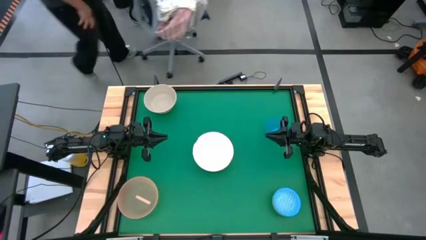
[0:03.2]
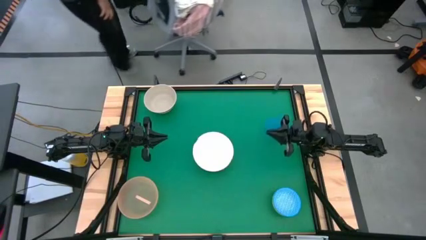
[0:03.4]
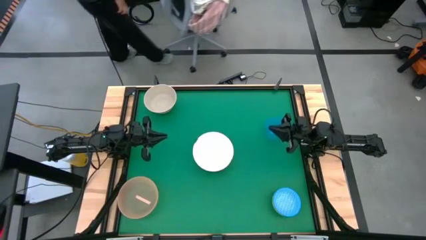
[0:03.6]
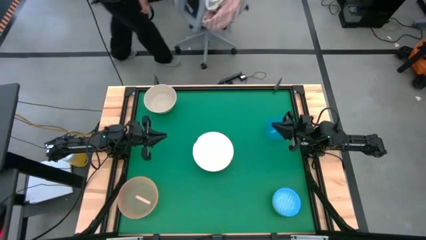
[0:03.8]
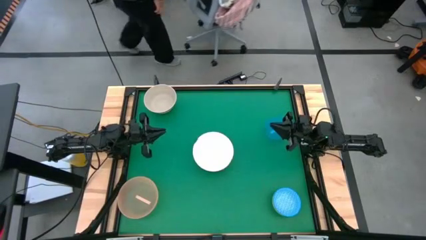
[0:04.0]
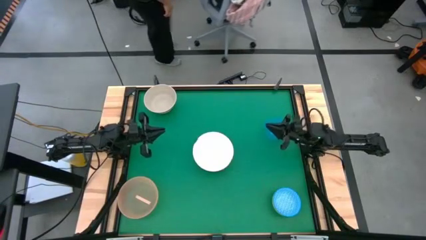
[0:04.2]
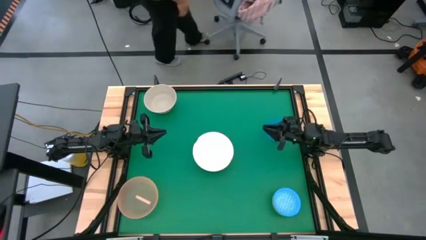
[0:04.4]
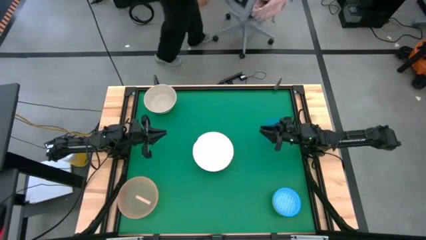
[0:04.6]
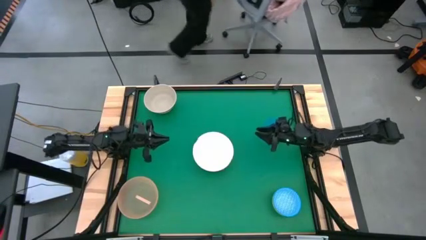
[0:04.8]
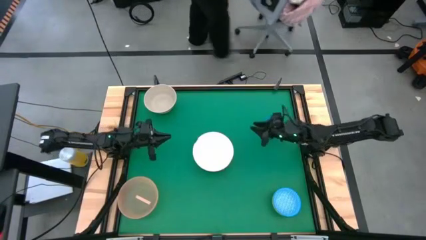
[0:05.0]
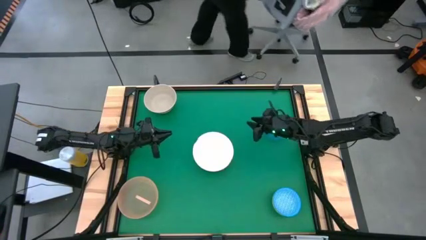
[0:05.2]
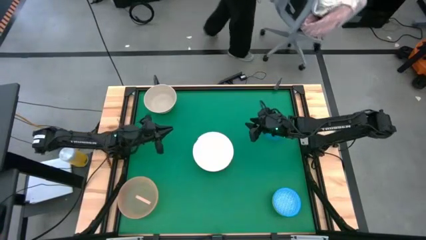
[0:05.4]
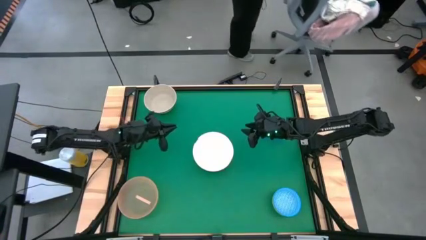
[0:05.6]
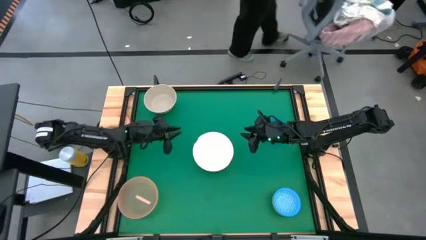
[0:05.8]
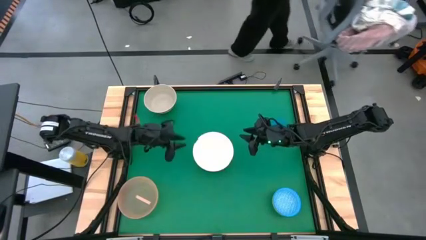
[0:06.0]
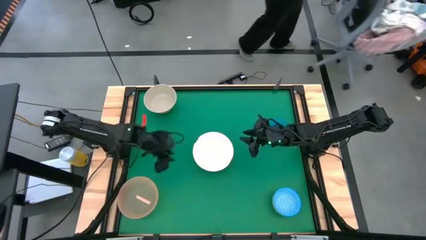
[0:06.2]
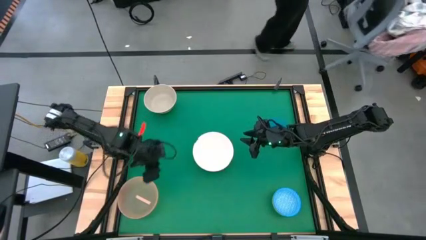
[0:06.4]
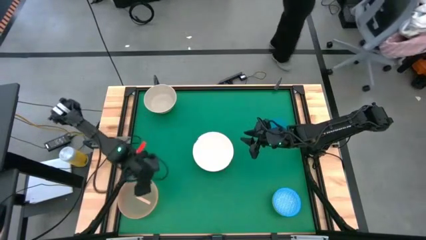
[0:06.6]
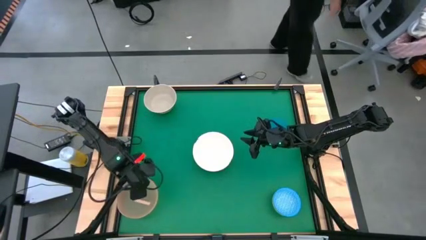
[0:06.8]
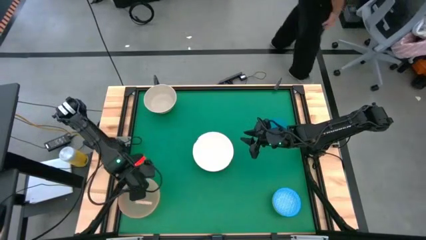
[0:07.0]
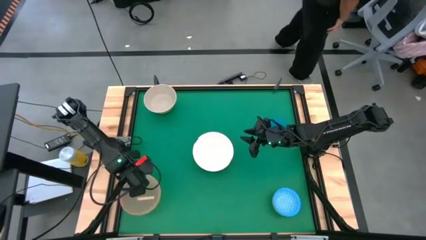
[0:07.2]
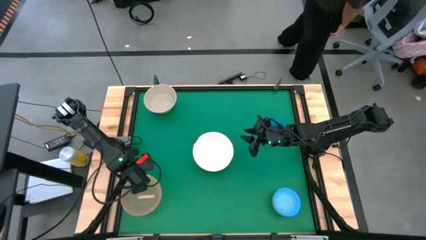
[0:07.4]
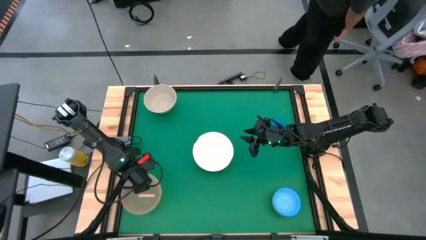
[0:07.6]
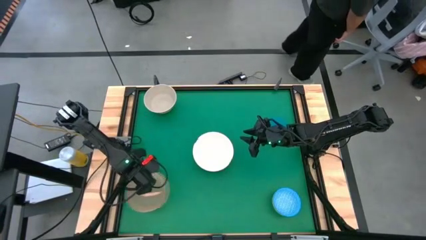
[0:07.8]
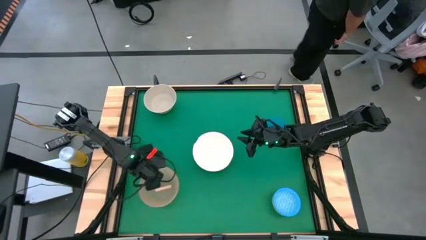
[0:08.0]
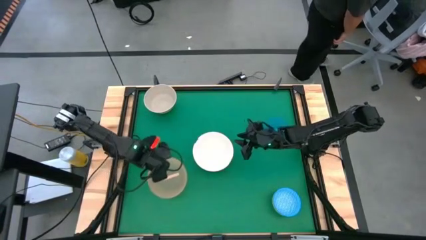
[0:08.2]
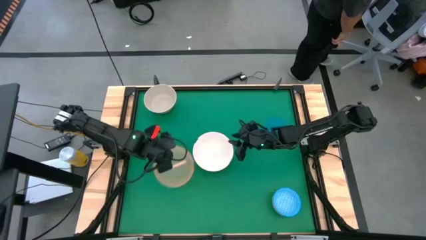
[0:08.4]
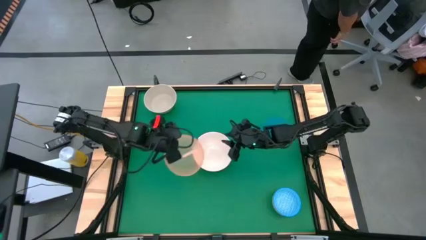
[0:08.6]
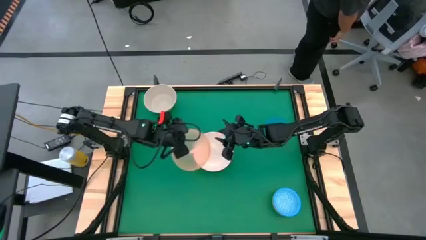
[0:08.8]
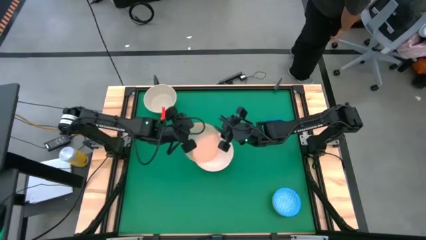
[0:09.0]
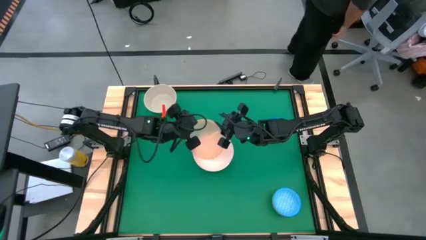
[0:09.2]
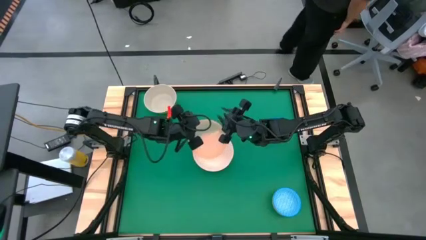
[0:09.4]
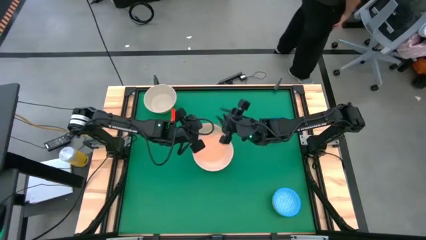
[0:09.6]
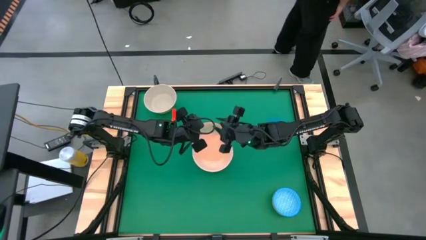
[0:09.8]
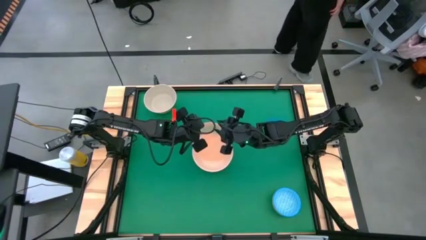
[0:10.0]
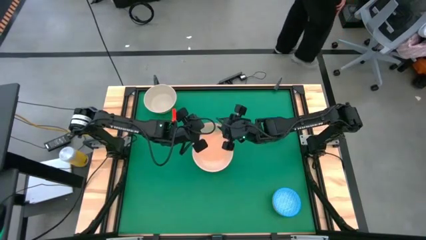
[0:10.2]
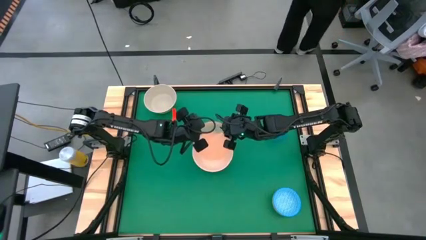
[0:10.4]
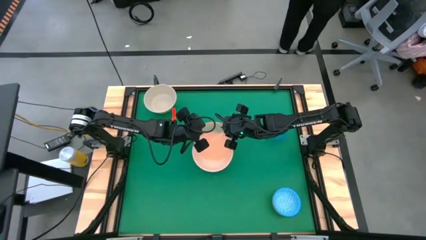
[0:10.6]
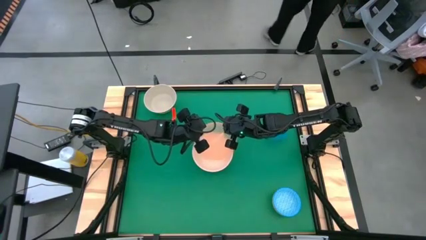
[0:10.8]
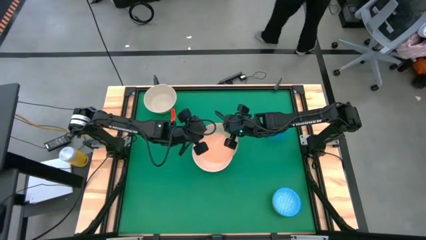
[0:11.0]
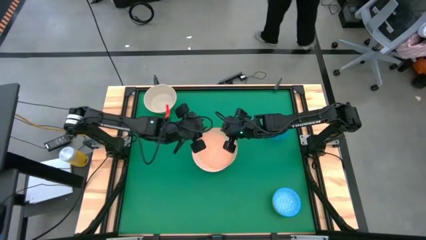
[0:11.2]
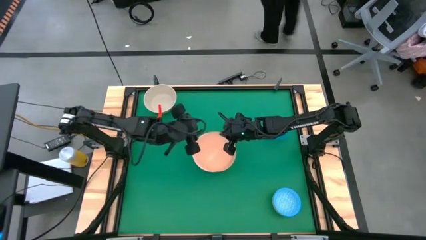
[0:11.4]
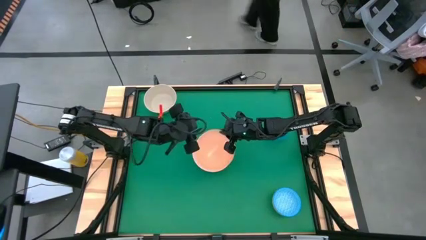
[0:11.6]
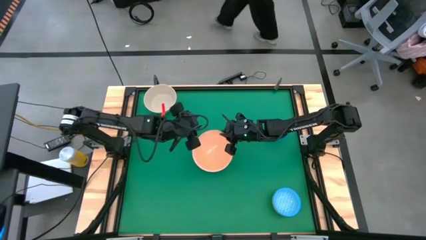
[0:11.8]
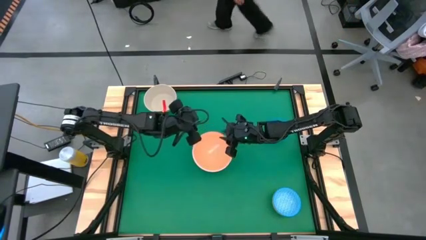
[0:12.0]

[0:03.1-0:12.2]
Stack the orange bowl on the white bowl

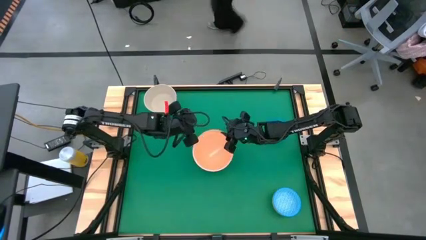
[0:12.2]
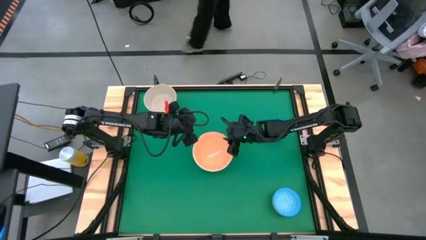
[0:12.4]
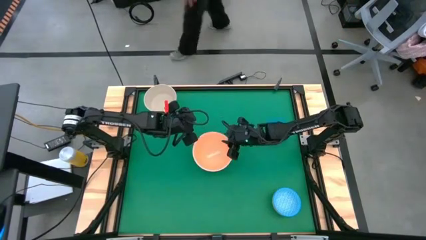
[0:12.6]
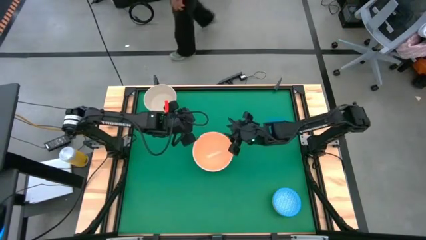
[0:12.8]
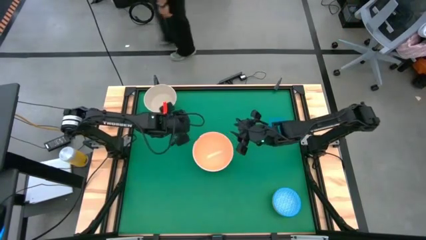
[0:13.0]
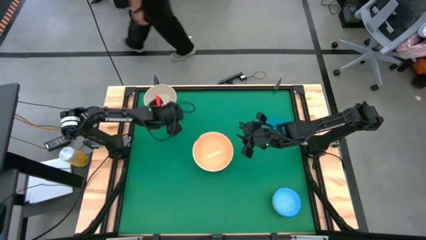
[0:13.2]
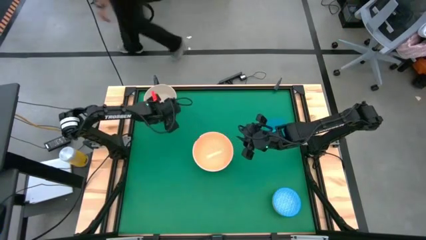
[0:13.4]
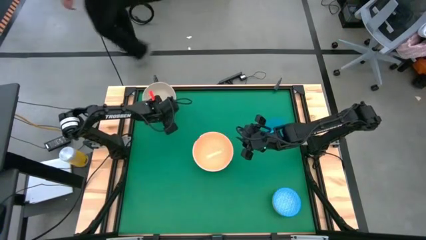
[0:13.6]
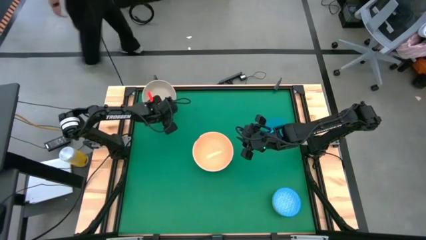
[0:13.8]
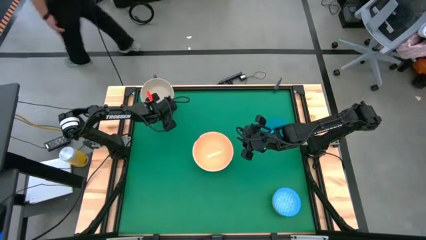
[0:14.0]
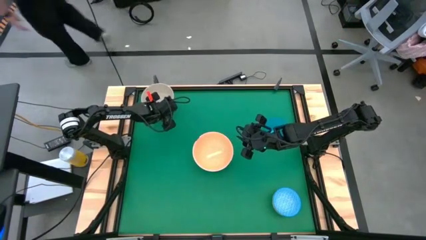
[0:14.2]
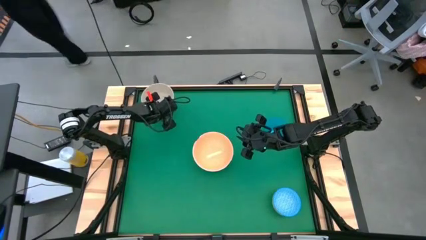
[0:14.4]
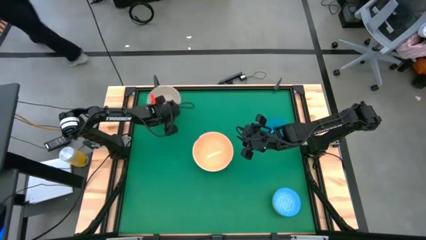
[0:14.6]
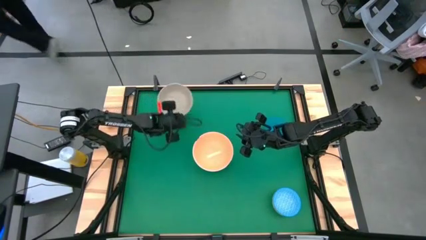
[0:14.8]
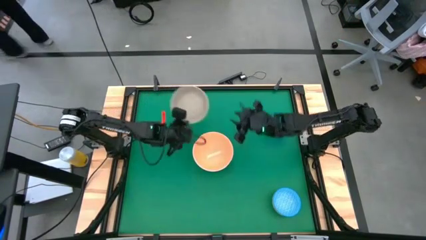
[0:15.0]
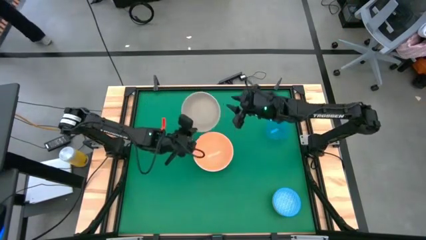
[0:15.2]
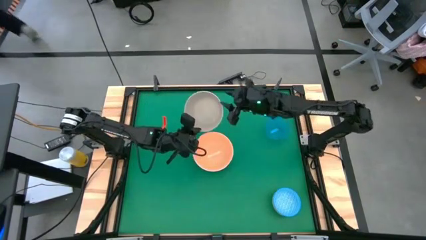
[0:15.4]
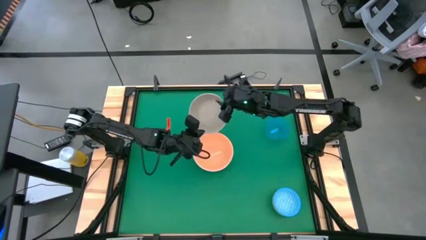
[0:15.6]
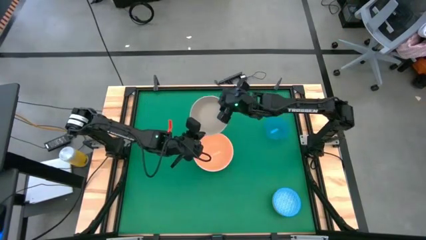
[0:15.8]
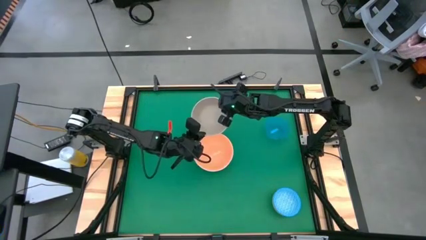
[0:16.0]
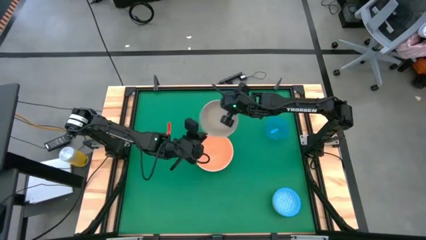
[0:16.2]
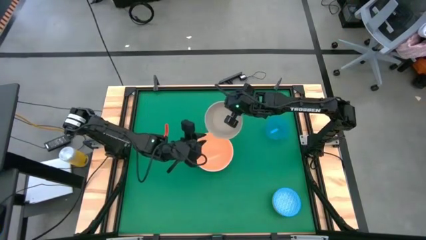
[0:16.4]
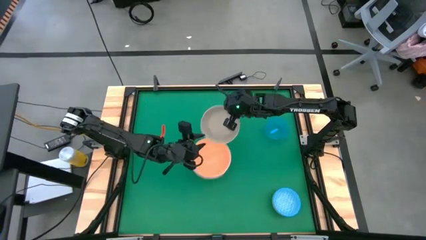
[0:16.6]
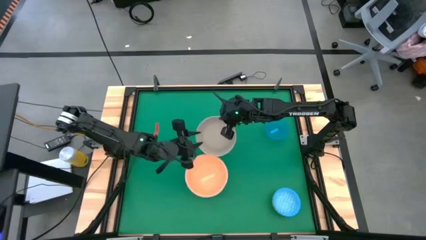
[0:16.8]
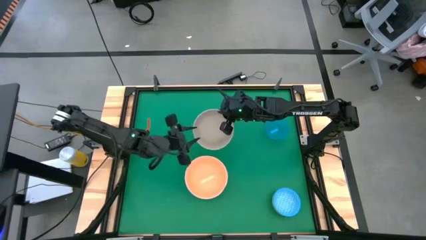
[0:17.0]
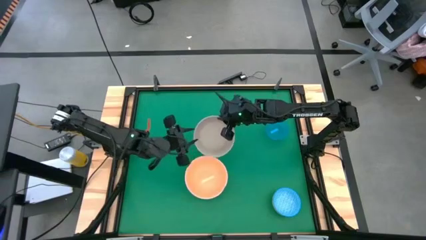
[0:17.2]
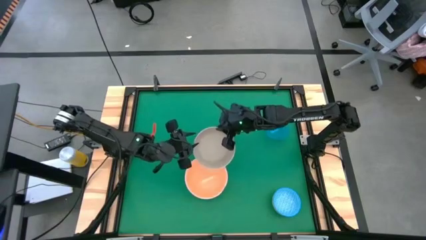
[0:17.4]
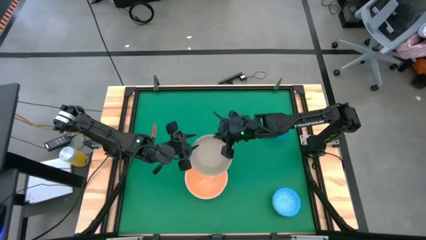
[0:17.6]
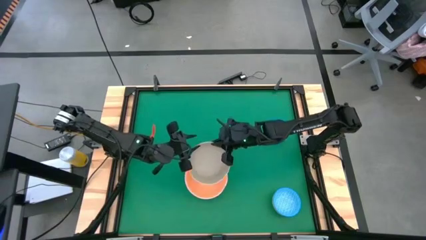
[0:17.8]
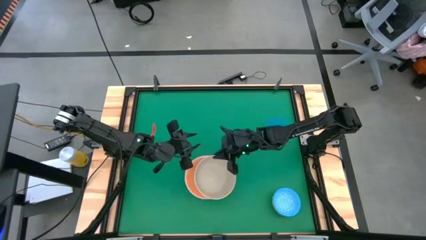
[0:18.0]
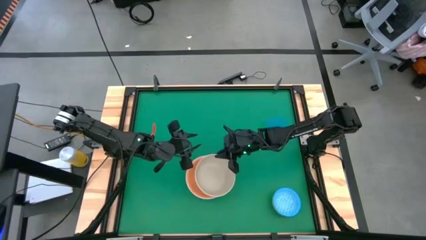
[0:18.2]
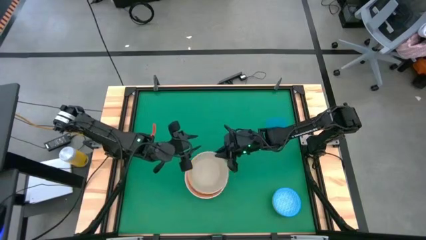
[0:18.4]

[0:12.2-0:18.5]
Stack the gray bowl on the orange bowl

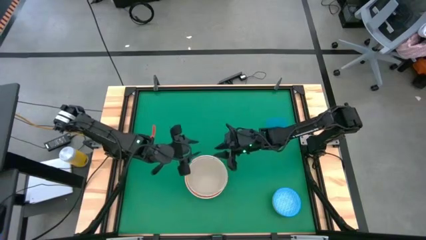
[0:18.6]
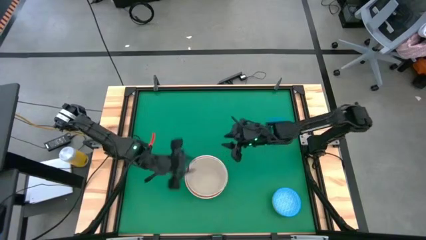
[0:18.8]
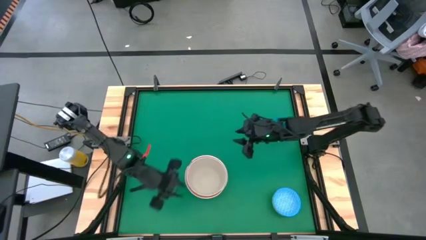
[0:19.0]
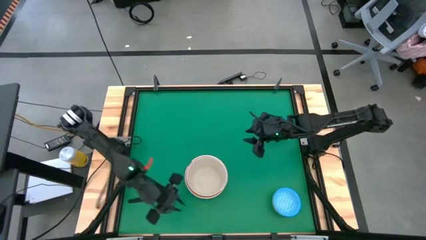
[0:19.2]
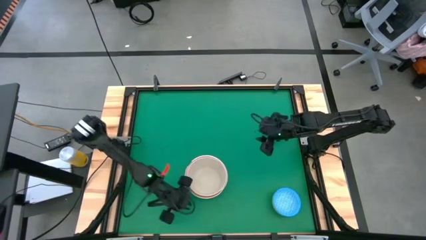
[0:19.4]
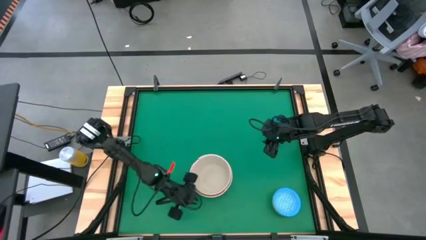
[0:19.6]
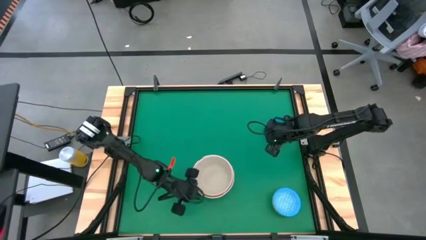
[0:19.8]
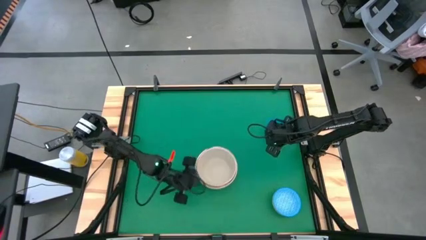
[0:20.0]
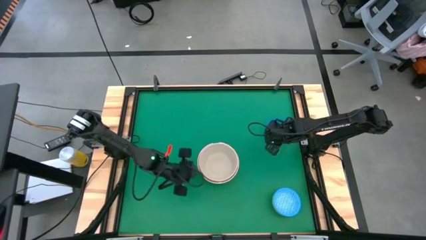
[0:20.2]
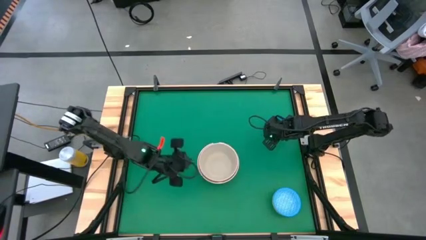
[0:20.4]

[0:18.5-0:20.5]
Adjust the stacked bowls
